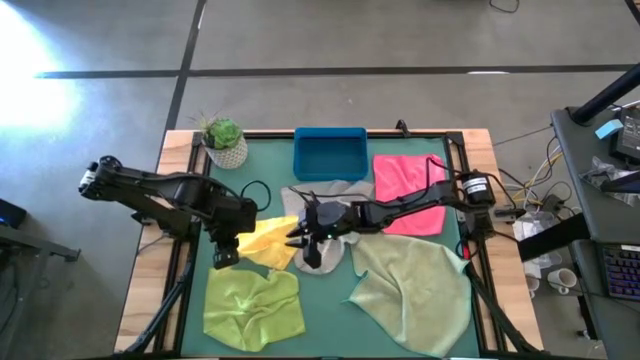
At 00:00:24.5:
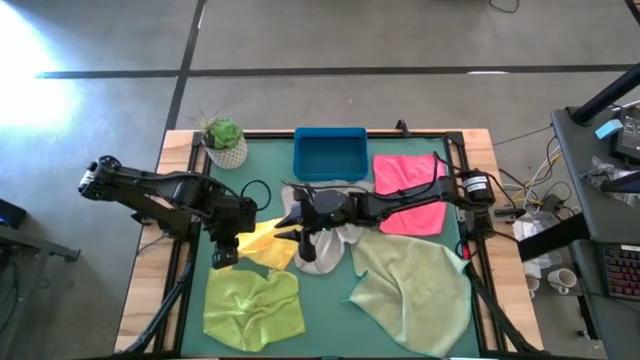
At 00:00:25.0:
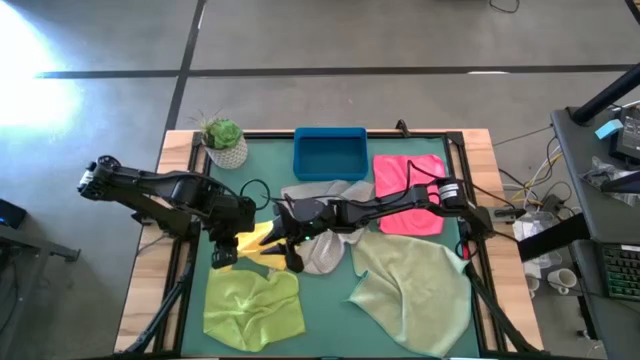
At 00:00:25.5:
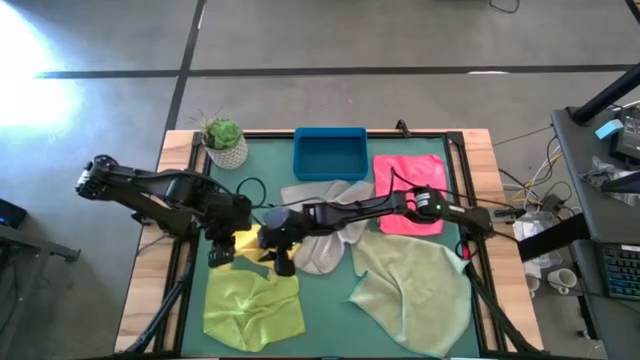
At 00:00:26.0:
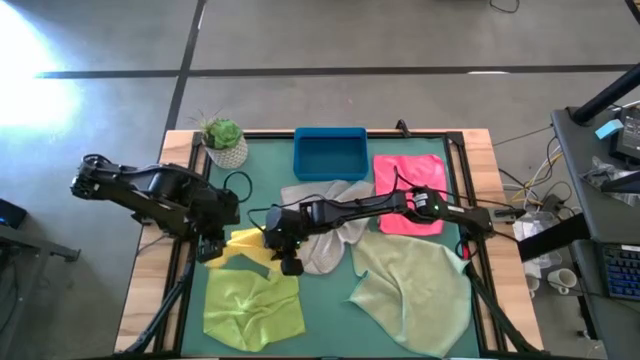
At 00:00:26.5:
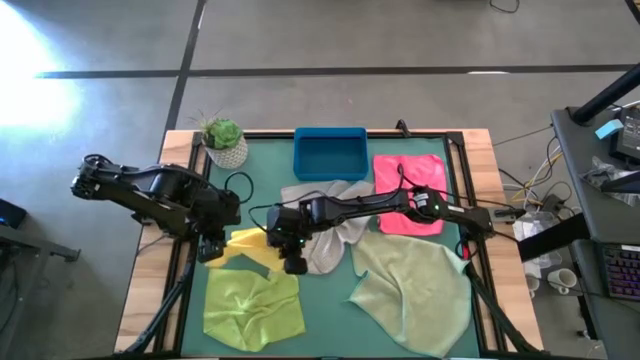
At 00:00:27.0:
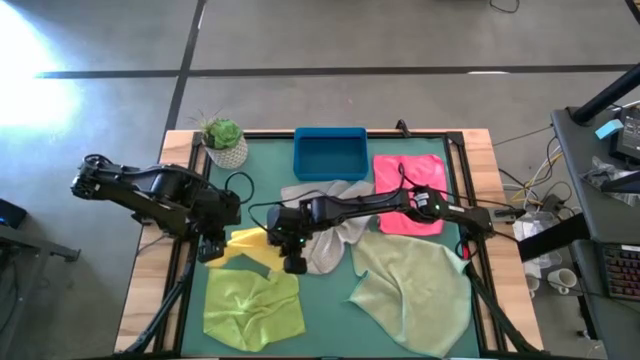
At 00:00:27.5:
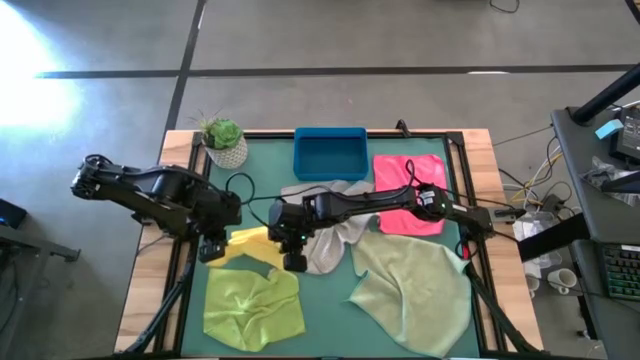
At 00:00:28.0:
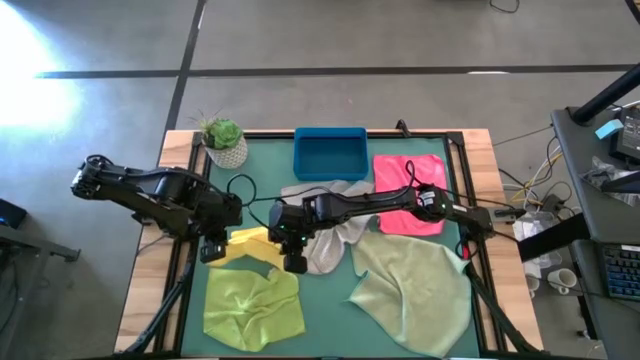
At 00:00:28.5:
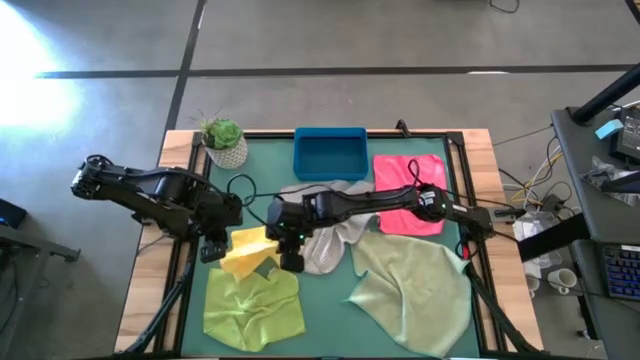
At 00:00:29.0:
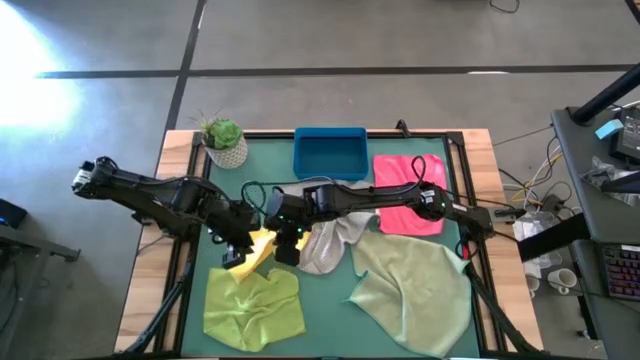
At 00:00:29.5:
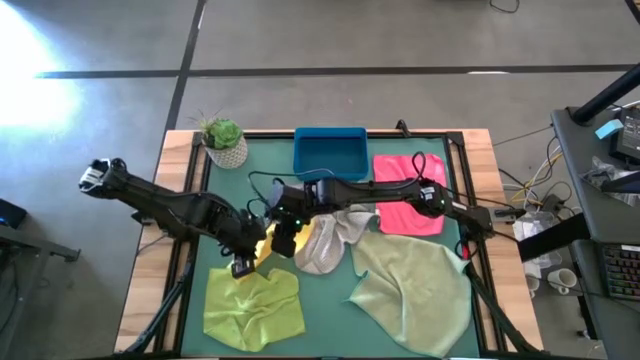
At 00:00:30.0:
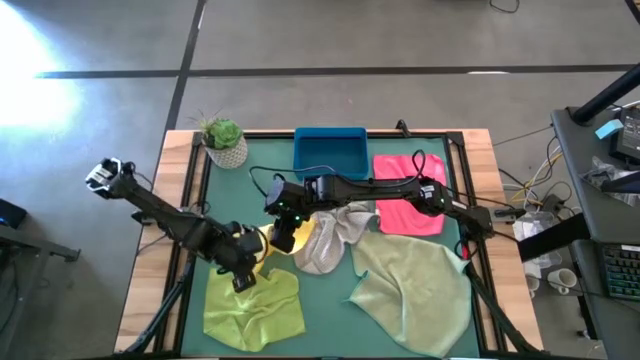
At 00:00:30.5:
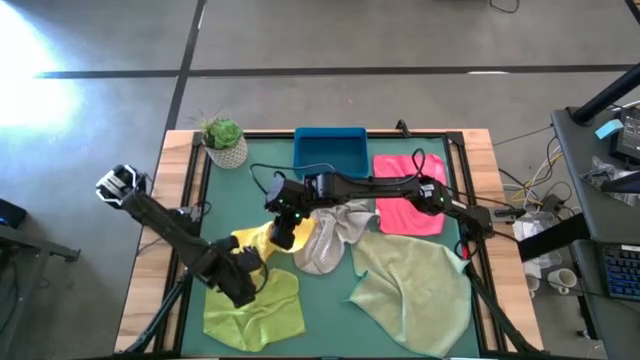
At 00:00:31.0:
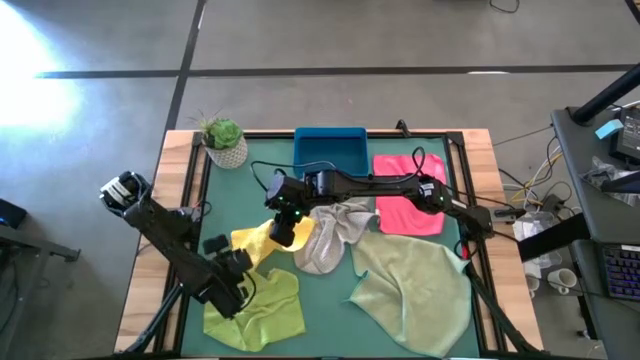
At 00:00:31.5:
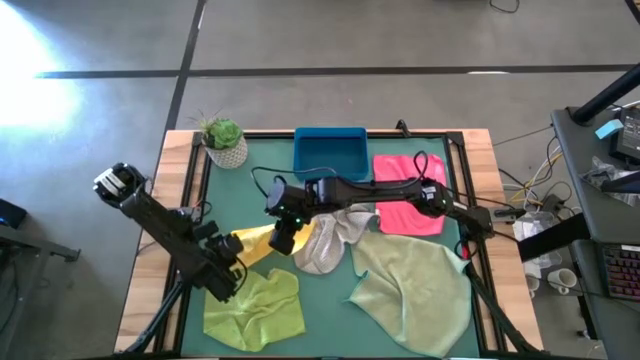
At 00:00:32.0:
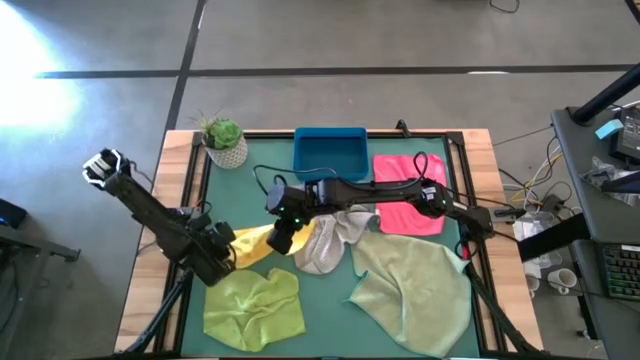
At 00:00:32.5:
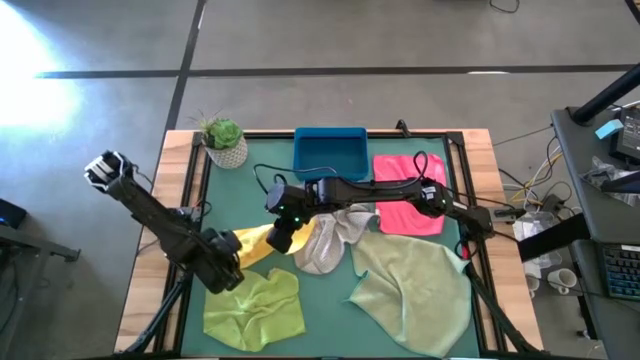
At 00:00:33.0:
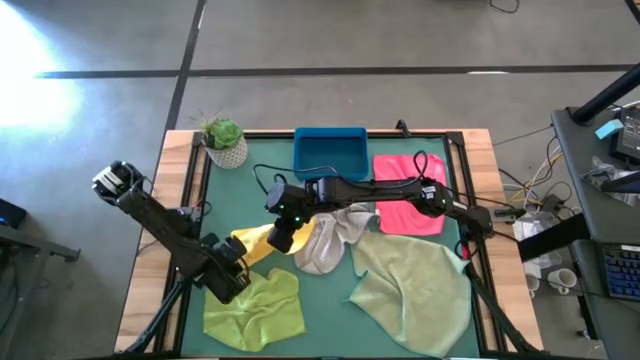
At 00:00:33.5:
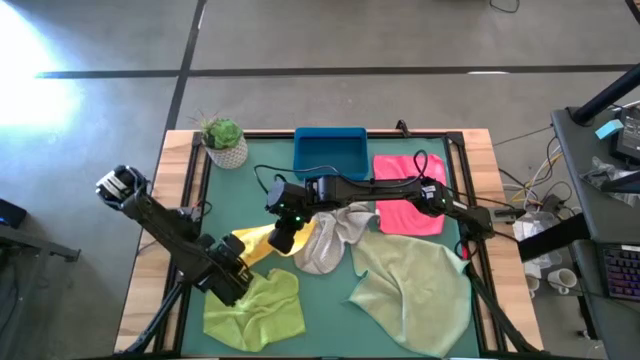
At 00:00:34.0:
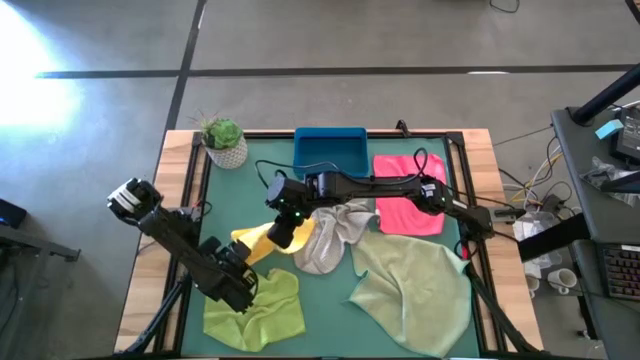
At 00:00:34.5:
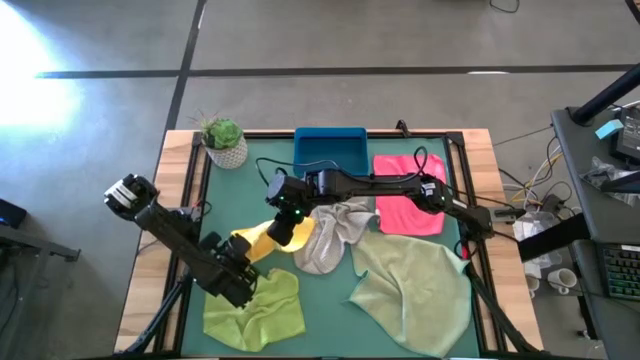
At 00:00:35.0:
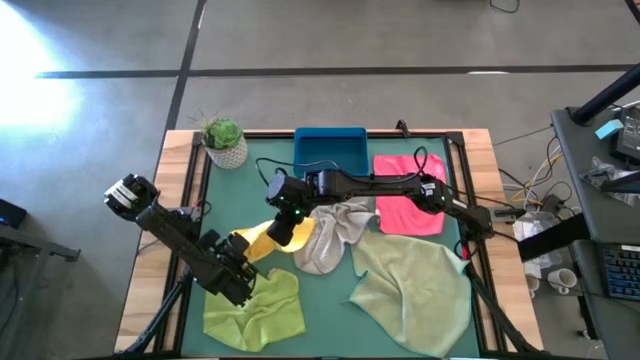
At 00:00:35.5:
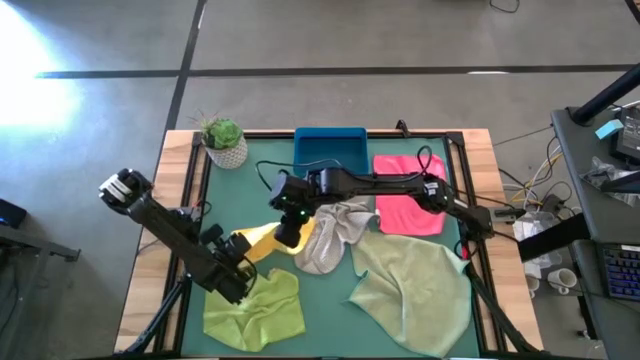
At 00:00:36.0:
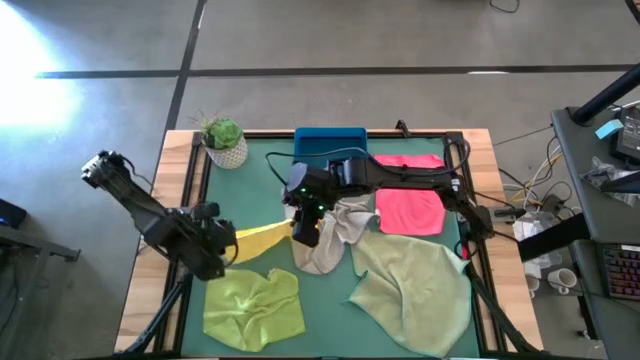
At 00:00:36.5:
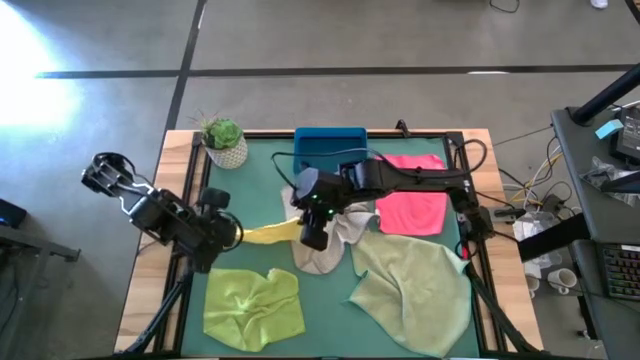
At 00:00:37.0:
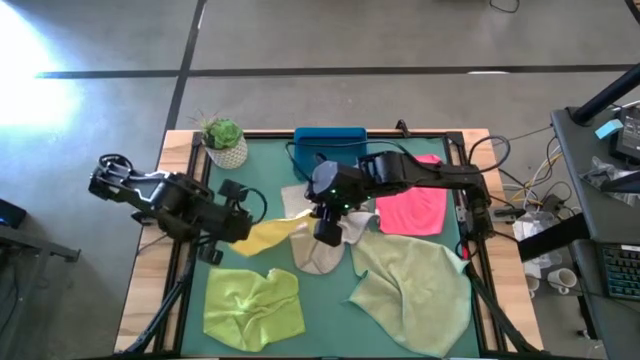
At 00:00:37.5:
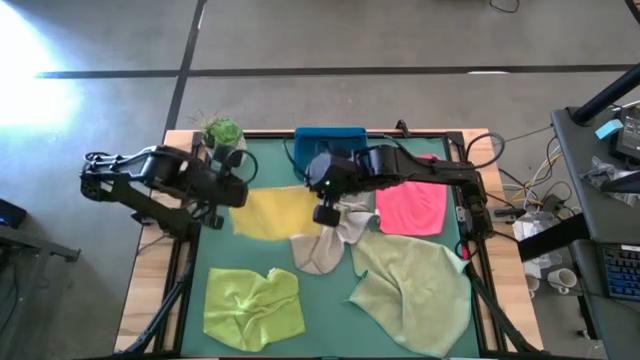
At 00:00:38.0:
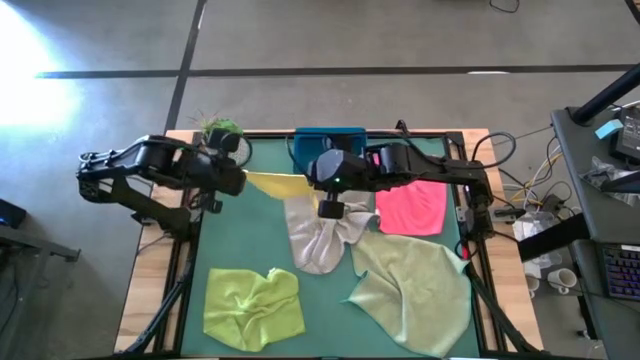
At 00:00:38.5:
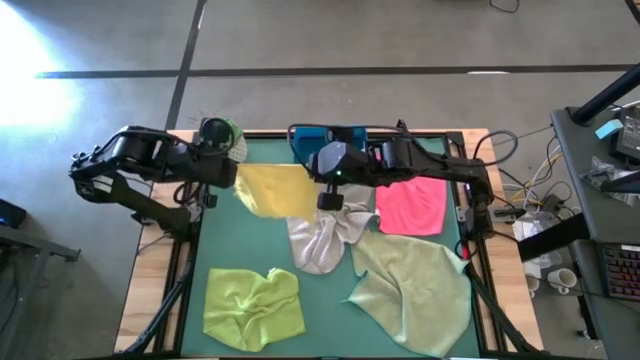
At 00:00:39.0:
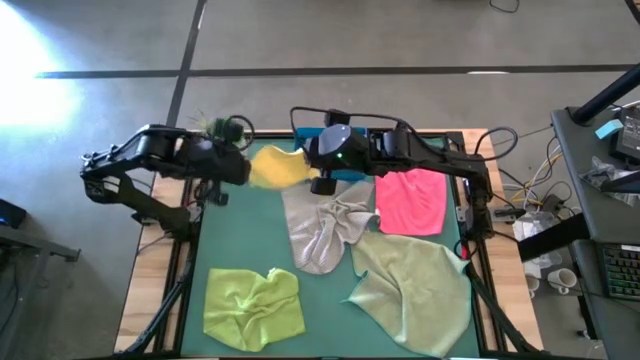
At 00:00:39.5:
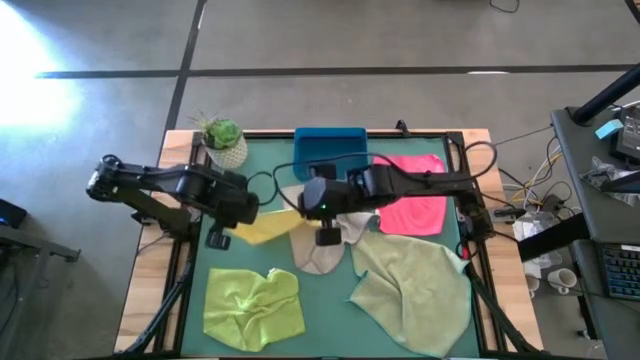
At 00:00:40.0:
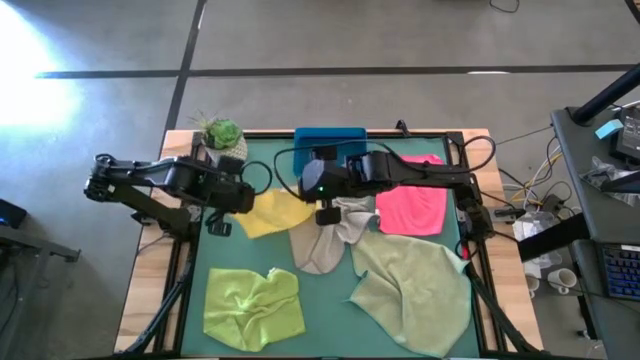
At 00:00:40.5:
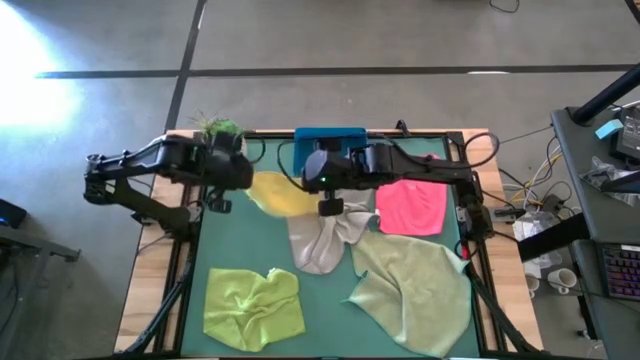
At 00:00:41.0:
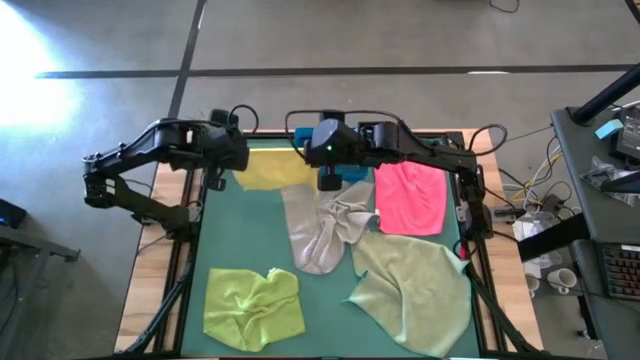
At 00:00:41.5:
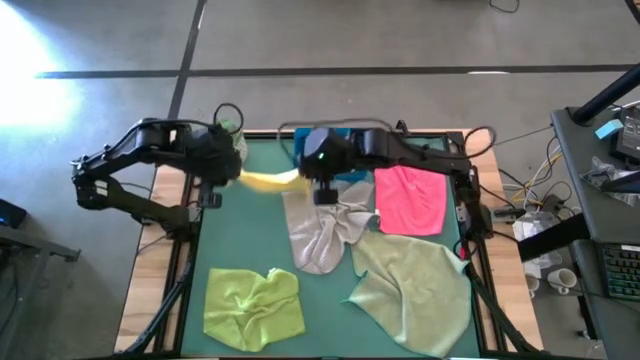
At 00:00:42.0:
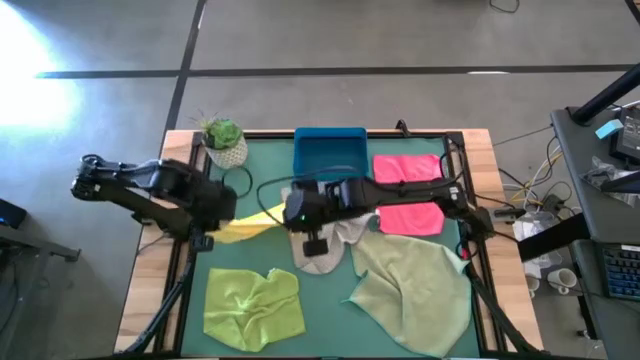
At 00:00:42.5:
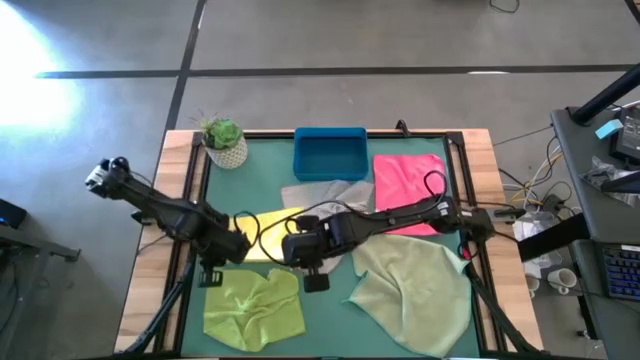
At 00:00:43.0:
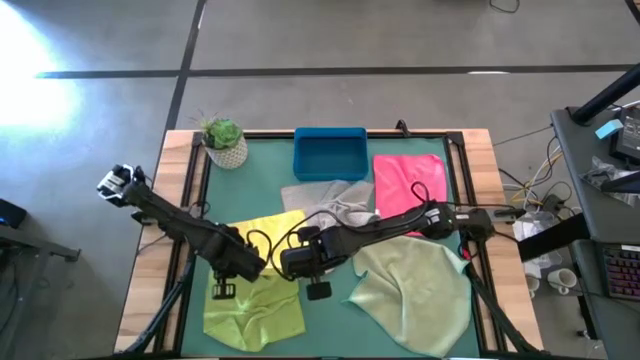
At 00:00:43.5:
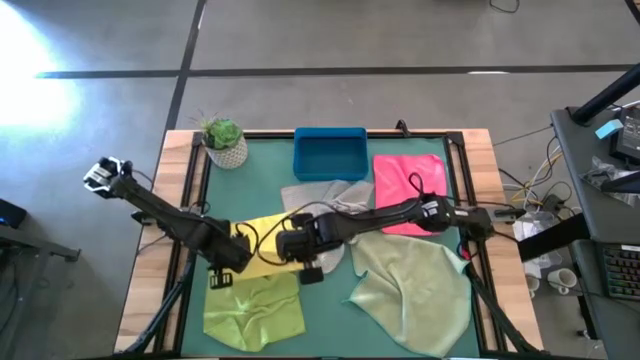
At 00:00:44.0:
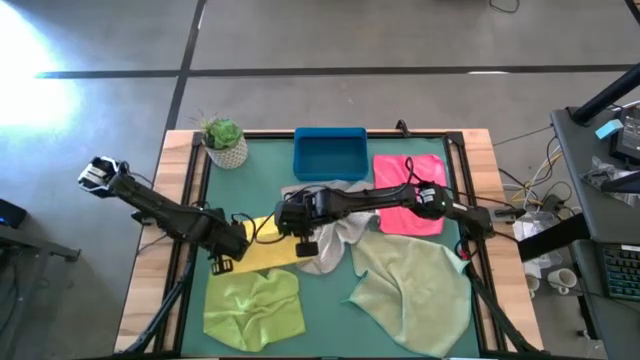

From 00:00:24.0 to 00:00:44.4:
Task: Fold microfiber towels
Fold the yellow microfiber cloth
